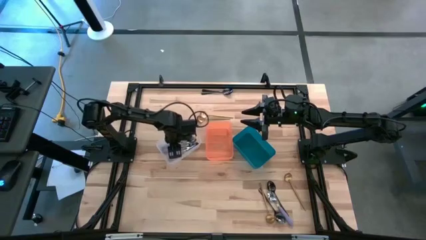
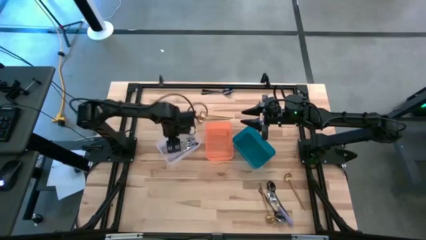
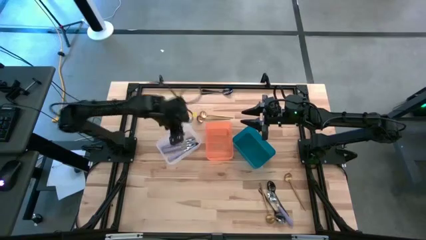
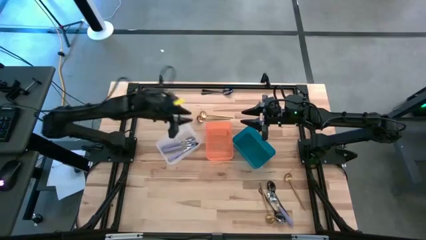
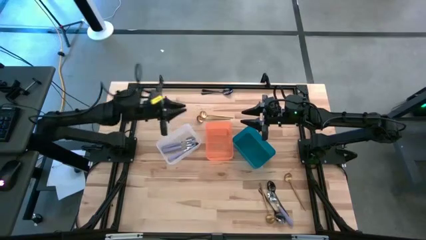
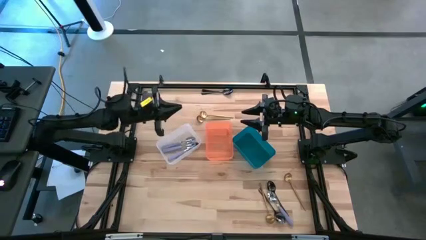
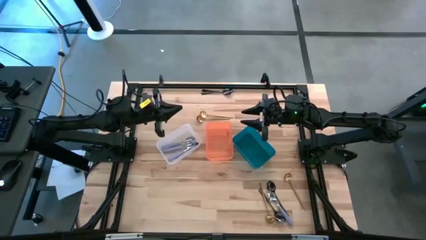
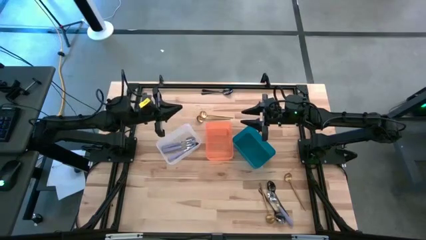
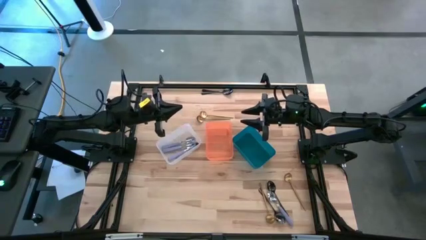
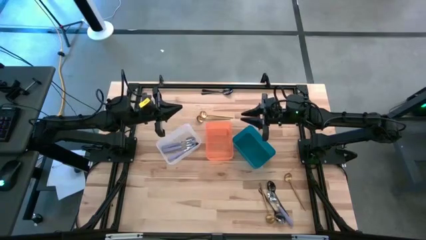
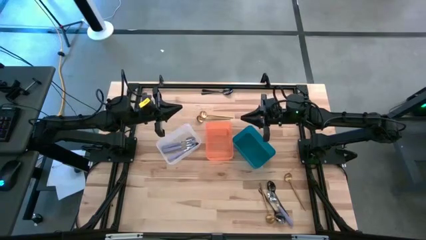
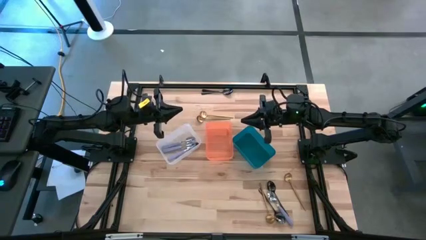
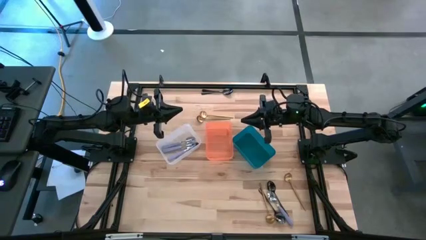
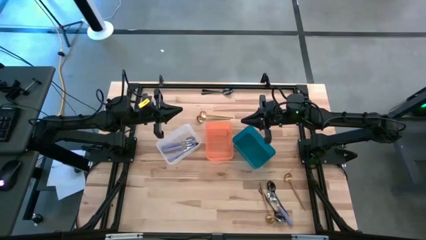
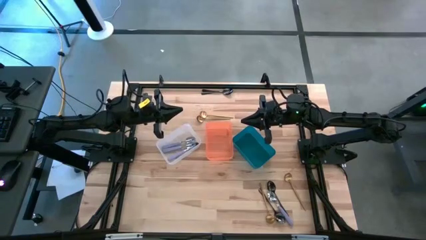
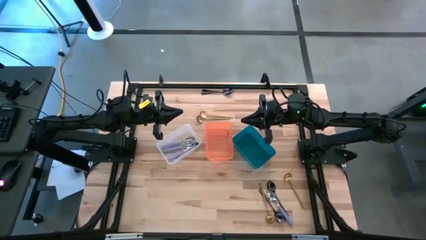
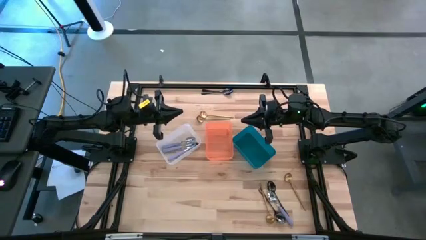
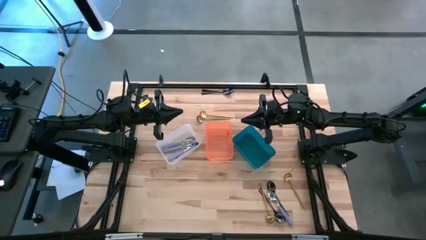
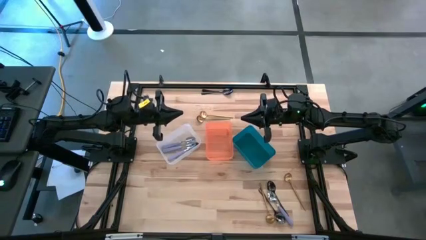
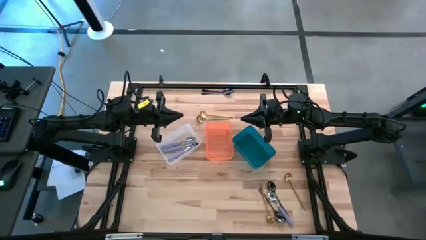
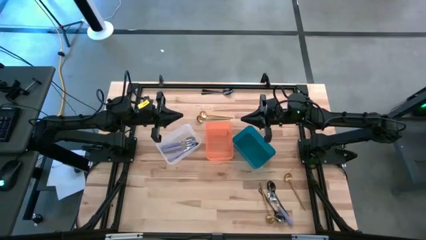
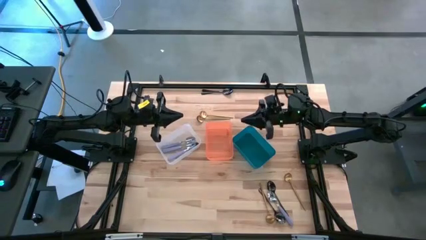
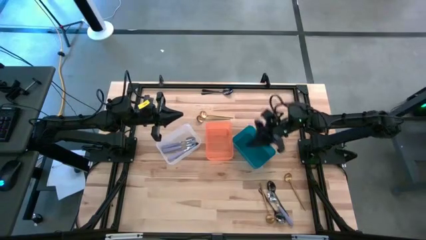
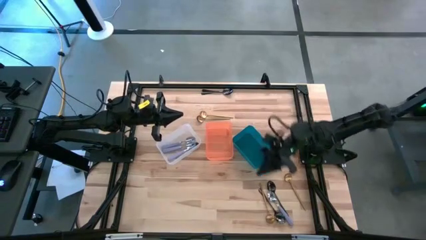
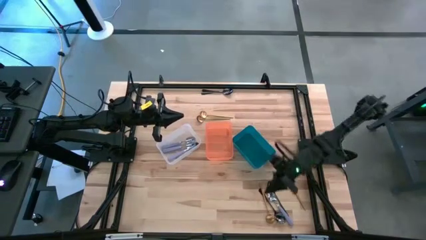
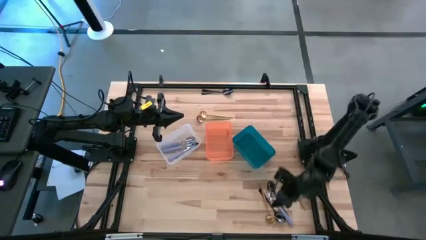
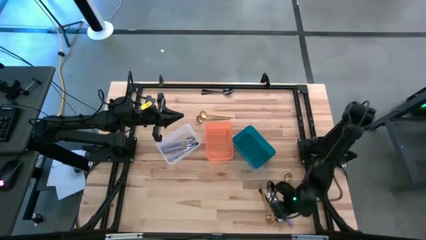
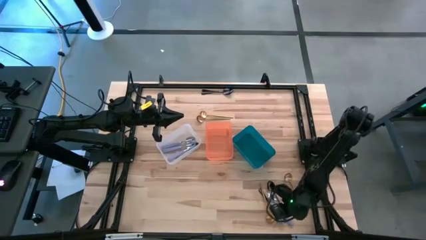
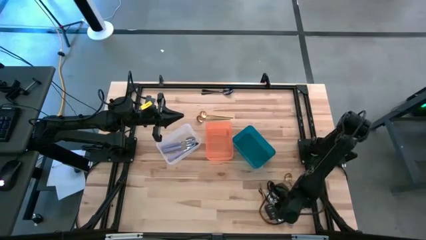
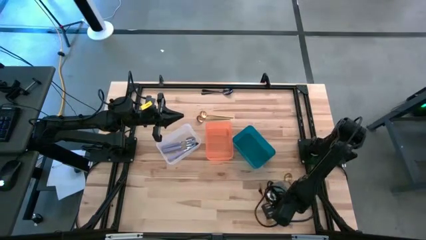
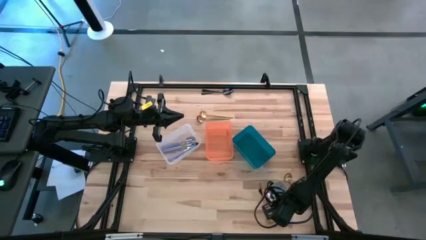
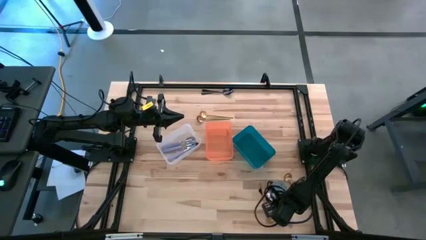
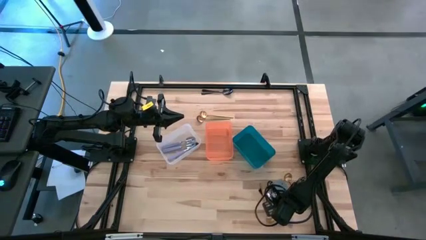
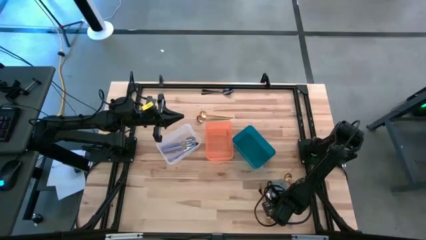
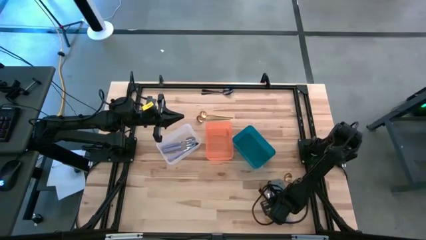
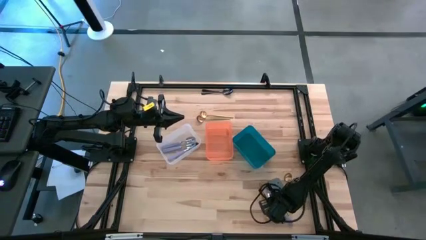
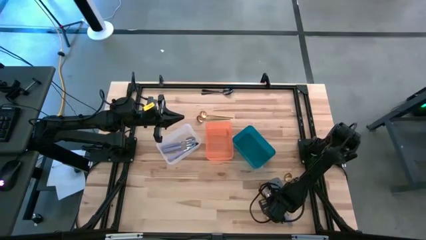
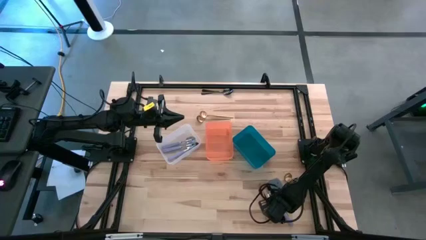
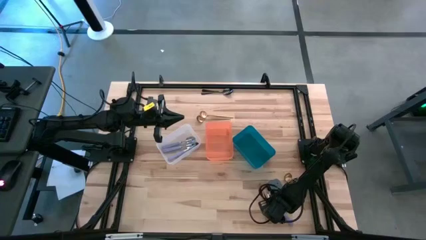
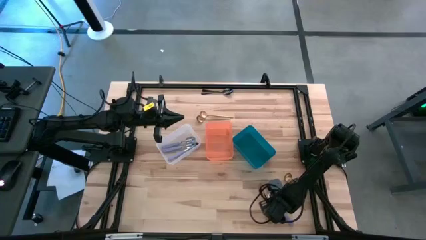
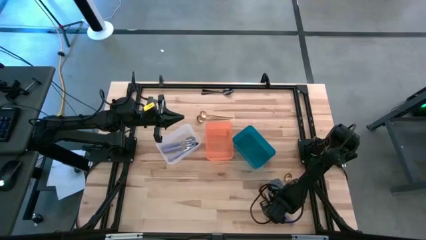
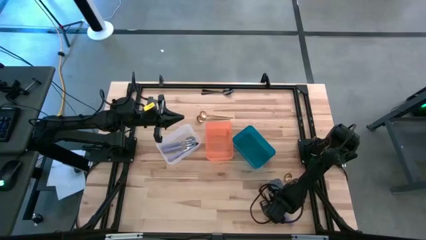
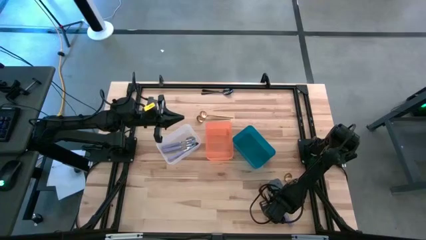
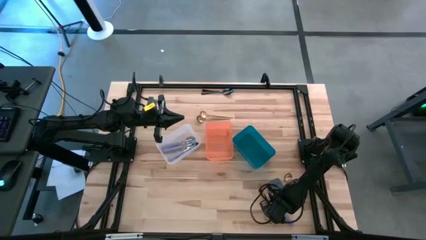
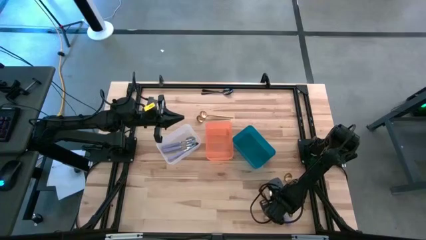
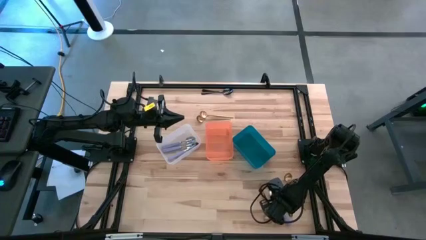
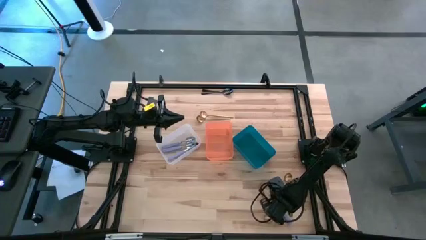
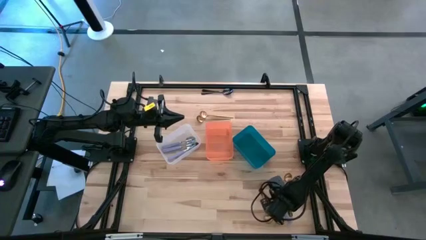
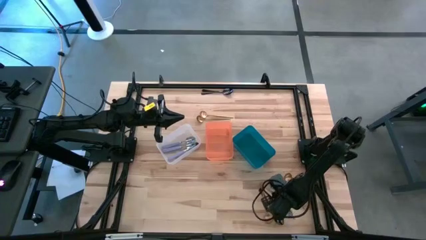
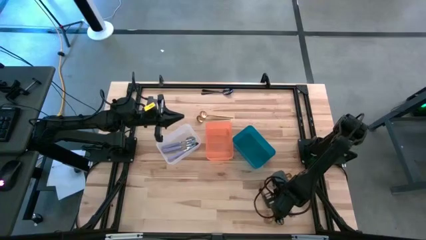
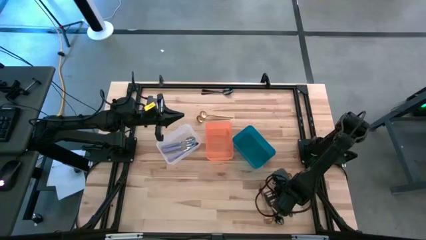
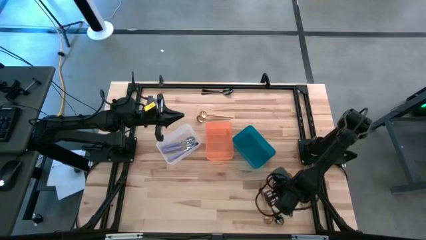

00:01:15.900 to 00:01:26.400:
Task: Sort silverware by color (type)
Put the purple spoon into the white bin

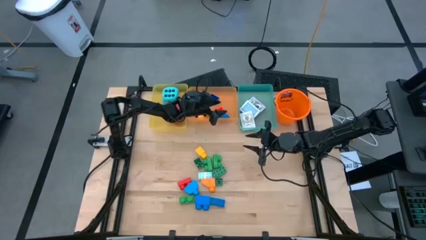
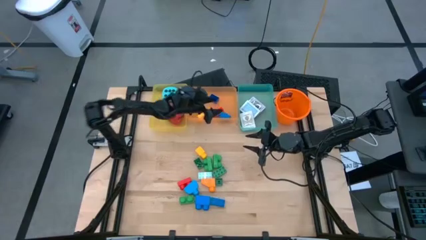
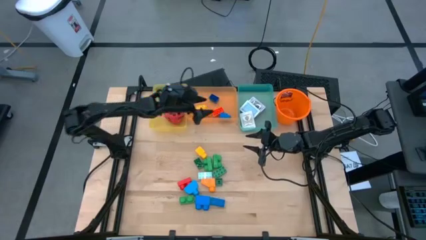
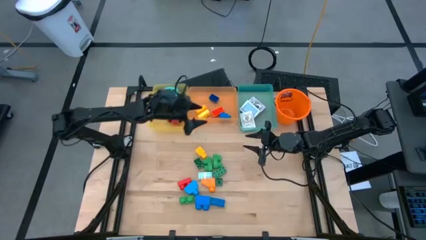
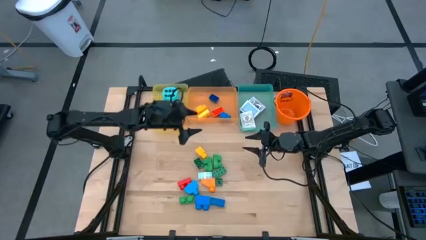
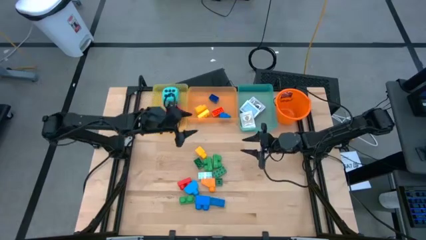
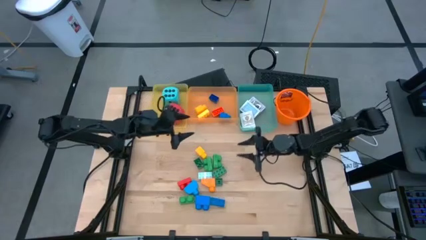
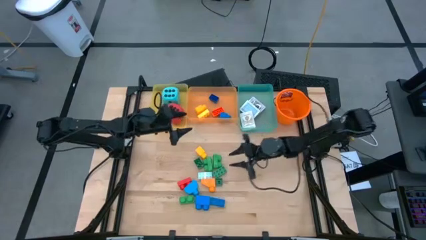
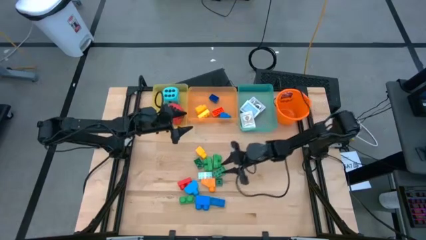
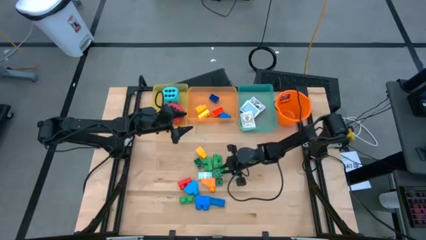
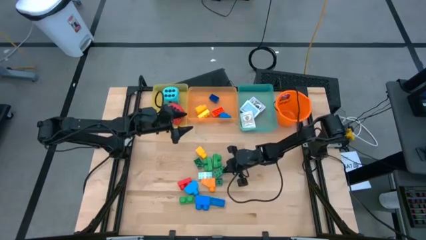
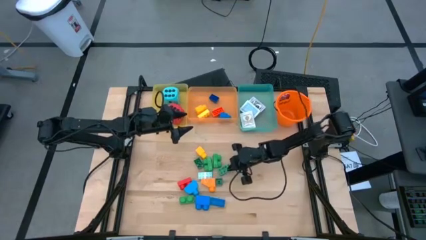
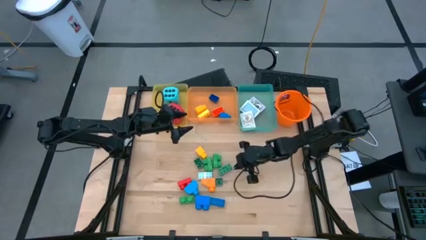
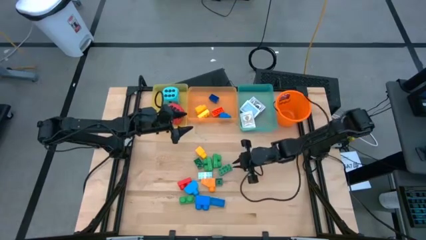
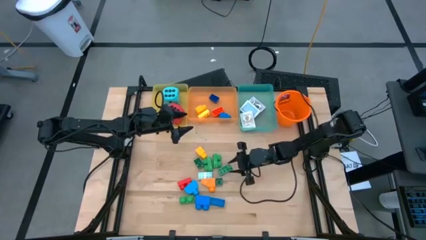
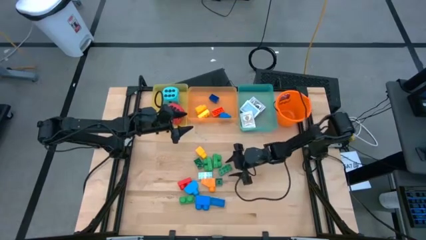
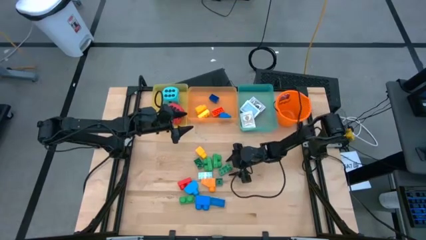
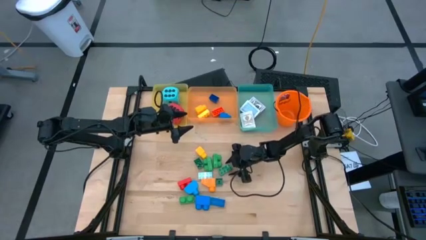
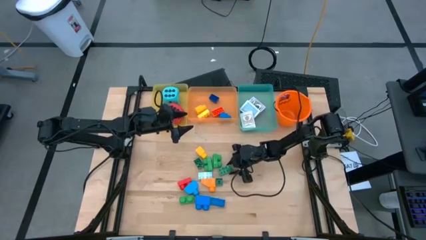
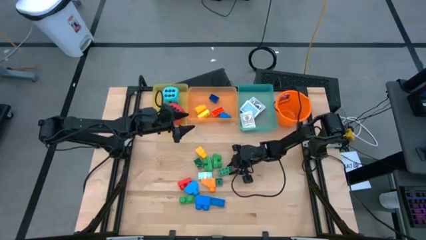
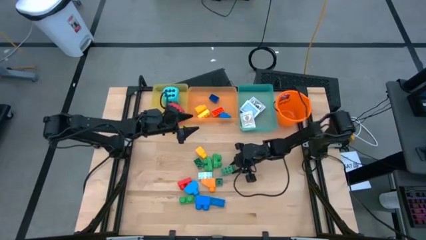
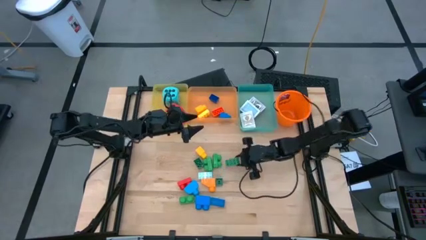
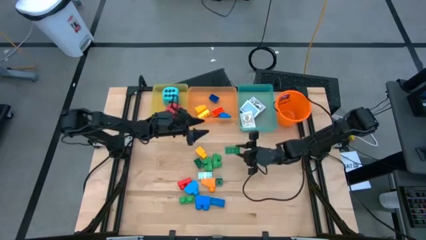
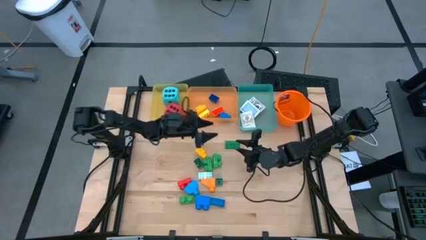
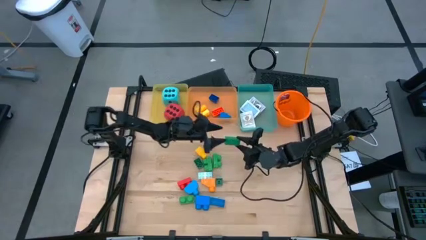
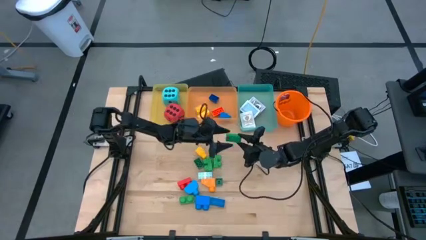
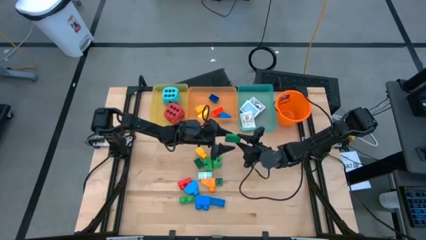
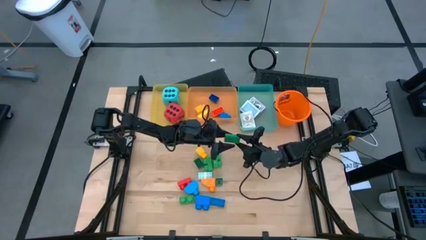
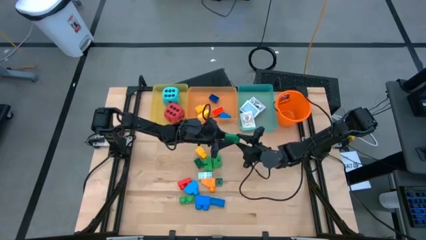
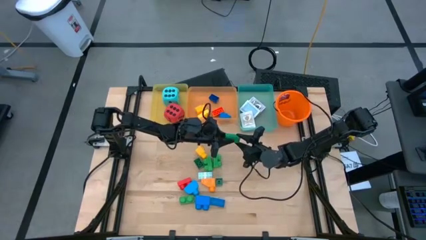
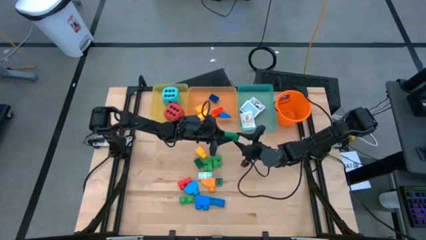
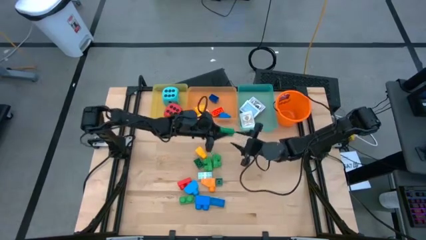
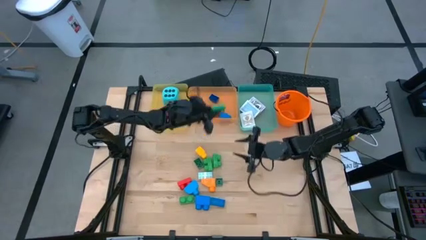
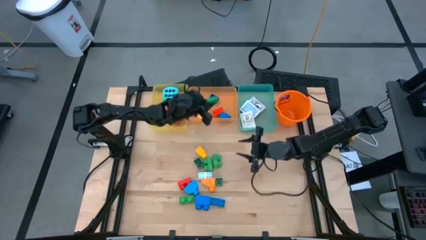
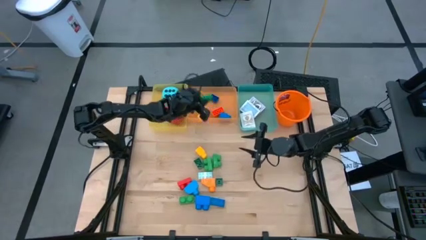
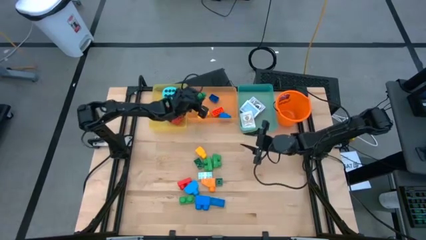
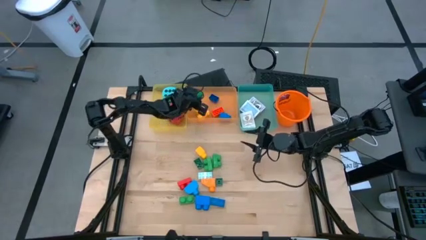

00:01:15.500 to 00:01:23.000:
Task: Pick & Place Toys
Put the green game piece into the orange bin
